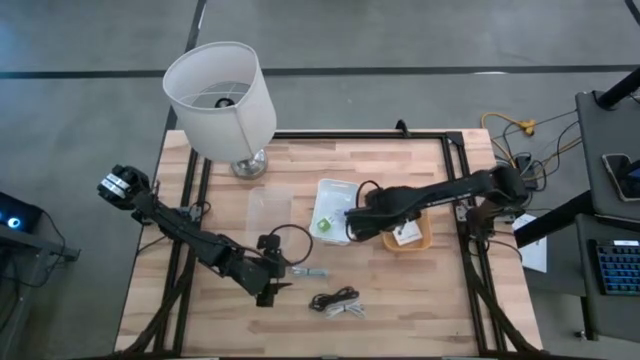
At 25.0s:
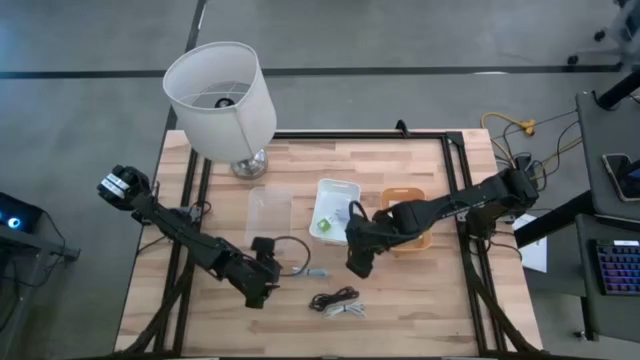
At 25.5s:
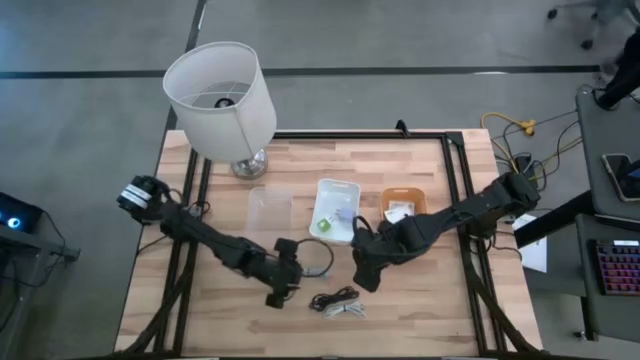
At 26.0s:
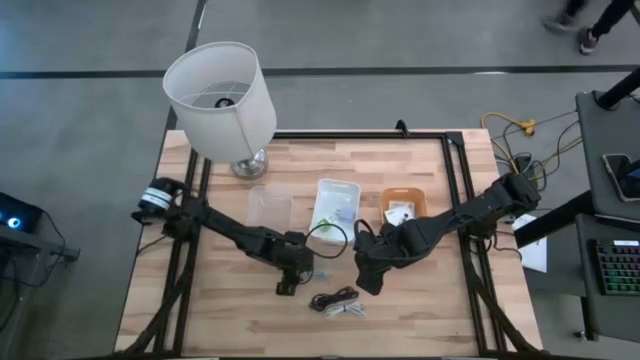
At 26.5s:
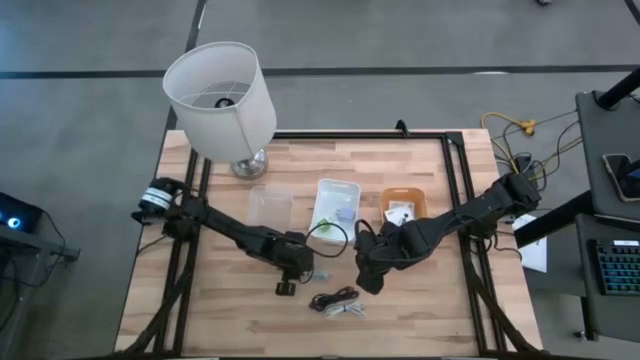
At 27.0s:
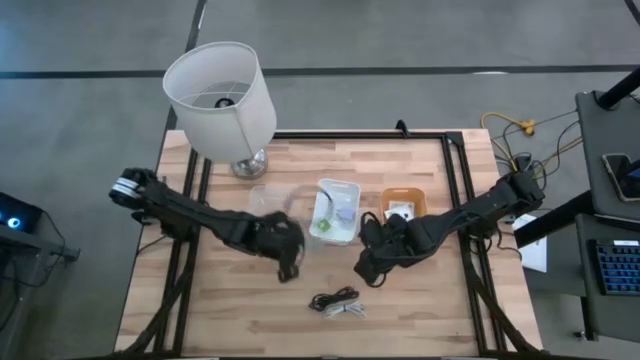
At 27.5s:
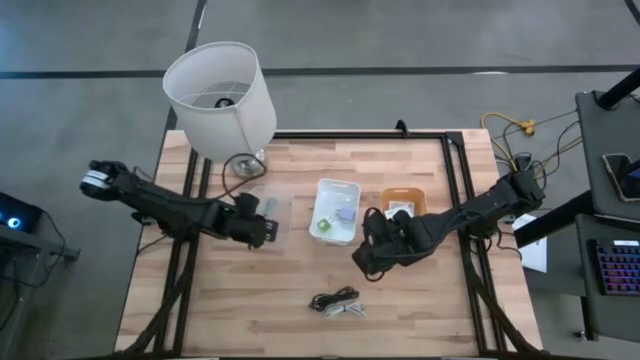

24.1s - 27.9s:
Task: Pick and place items into bin
Put the light blue USB cable into the transparent bin

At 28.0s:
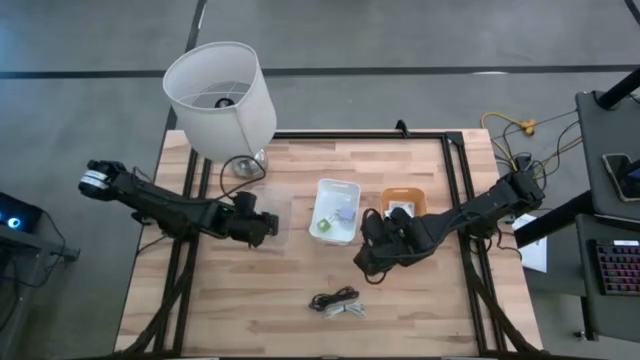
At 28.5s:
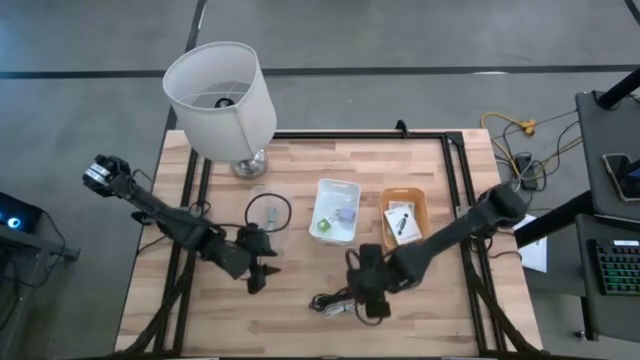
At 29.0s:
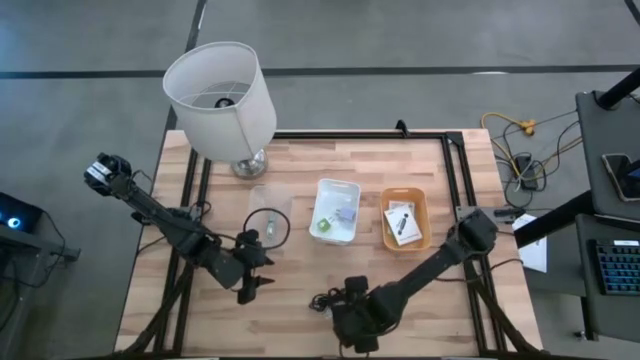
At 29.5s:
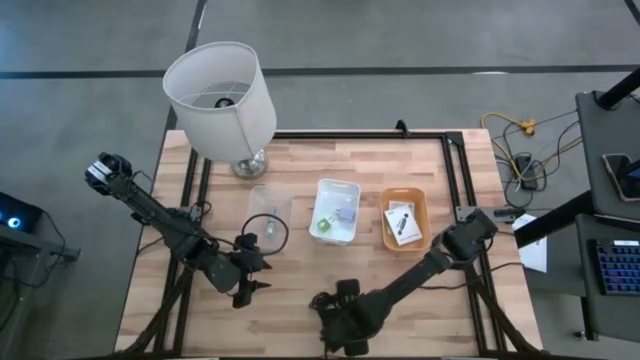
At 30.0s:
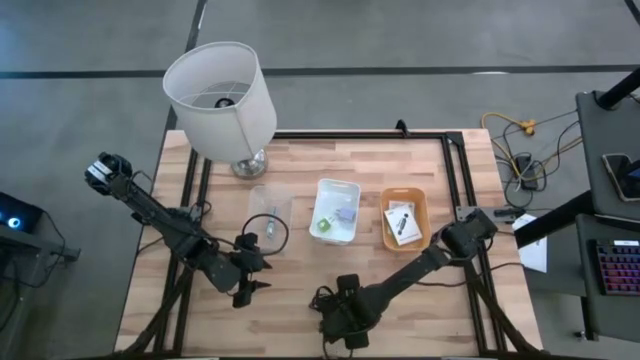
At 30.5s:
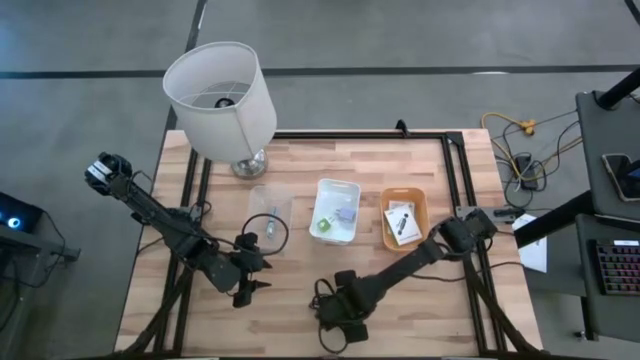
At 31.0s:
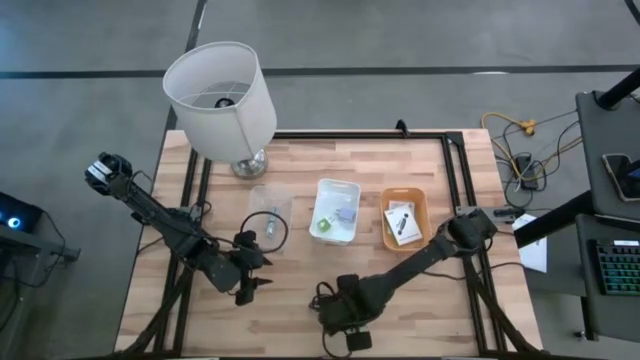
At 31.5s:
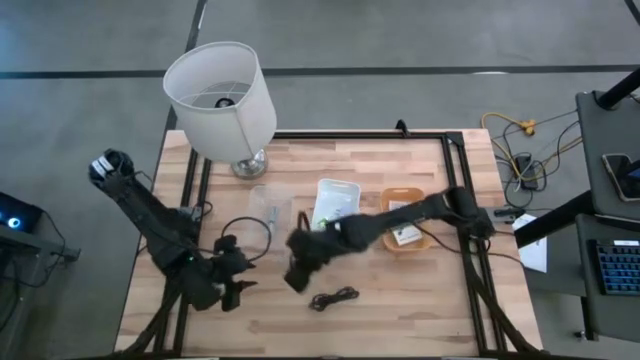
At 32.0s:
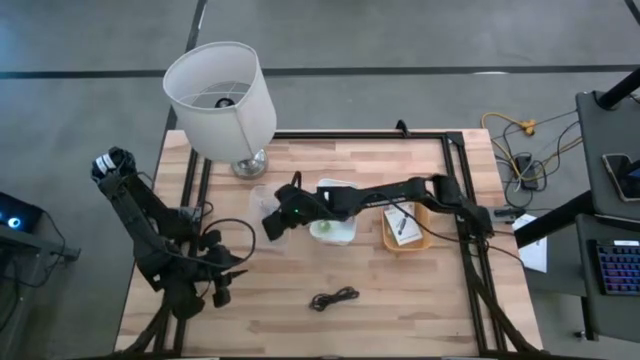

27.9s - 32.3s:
Put the white USB cable into the transparent bin

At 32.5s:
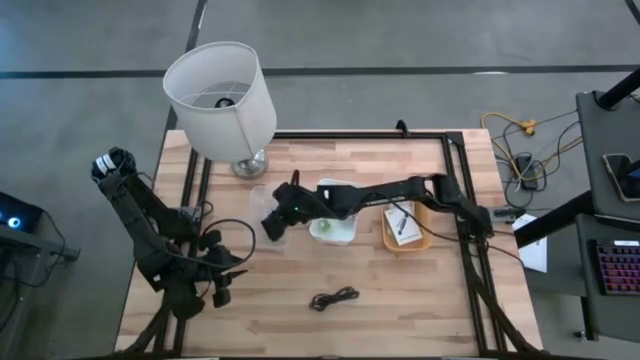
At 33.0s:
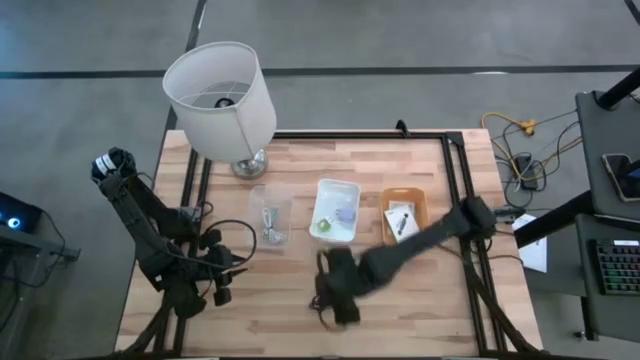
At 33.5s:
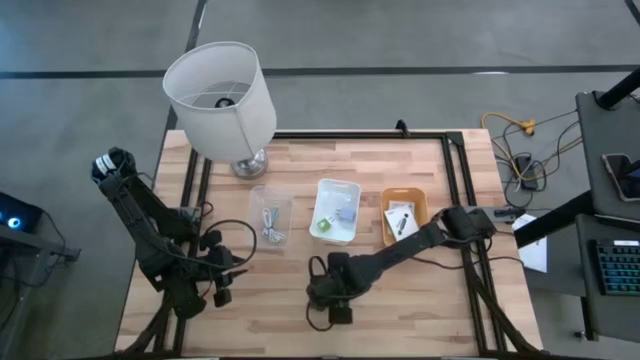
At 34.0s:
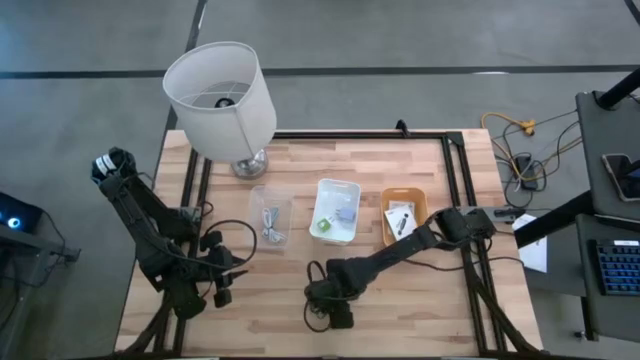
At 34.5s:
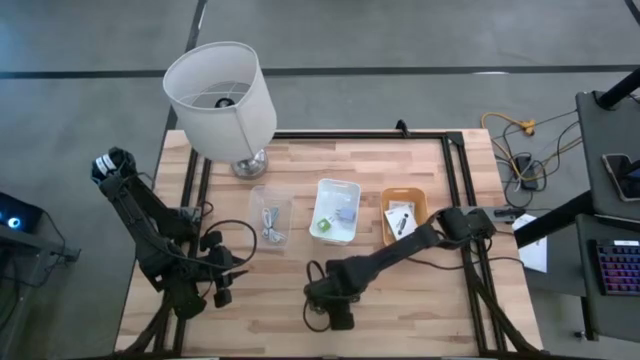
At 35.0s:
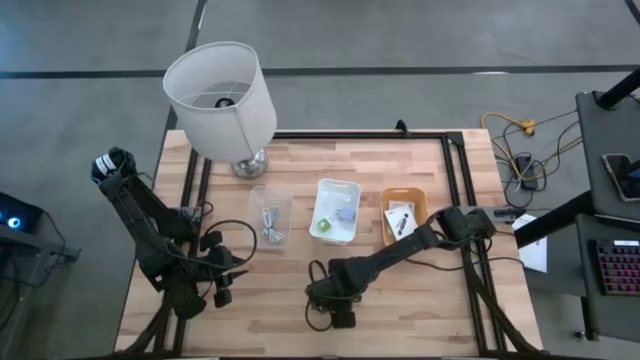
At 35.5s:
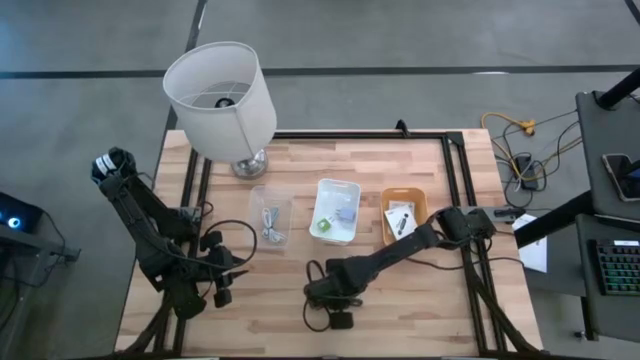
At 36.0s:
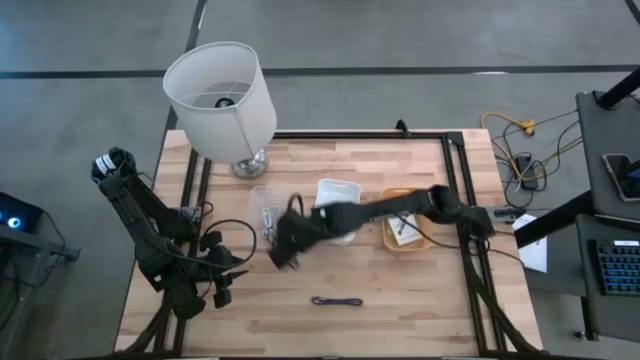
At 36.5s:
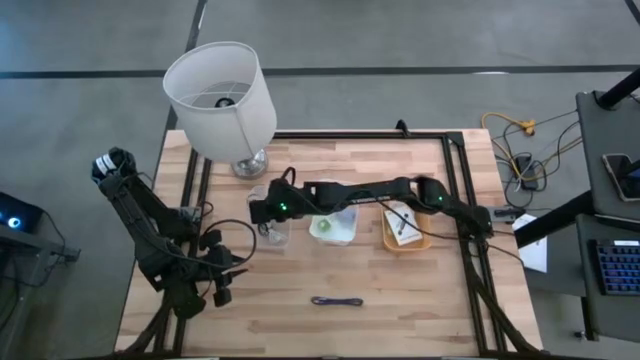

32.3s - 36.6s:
Put the black USB cable into the transparent bin

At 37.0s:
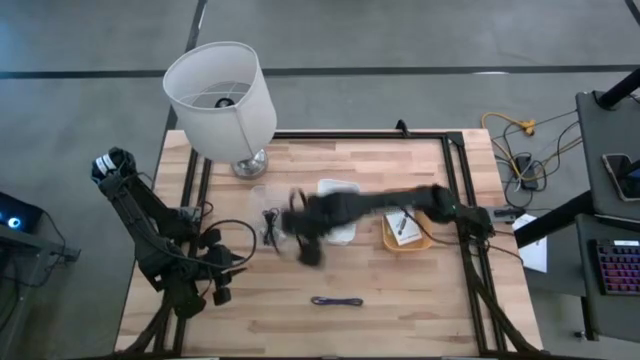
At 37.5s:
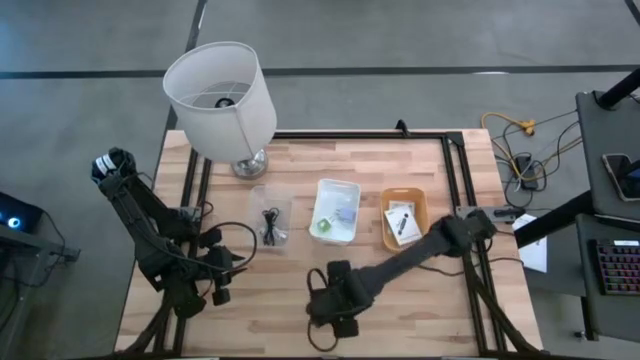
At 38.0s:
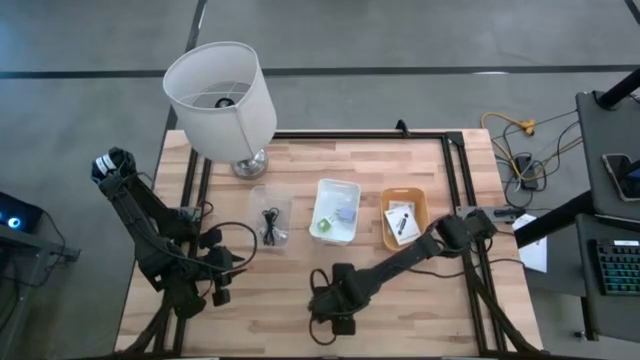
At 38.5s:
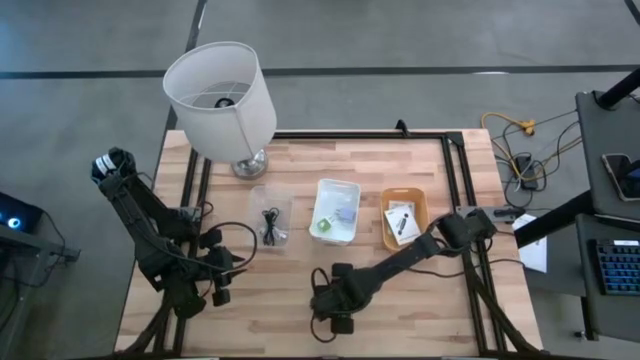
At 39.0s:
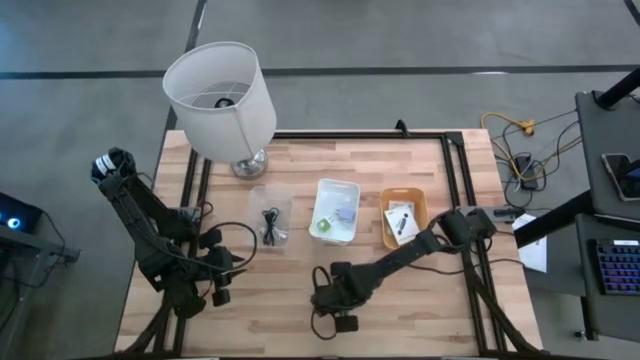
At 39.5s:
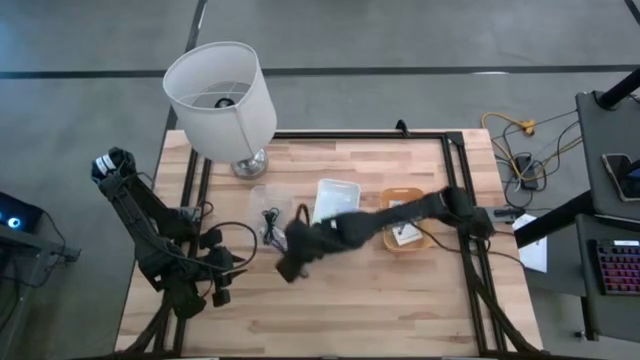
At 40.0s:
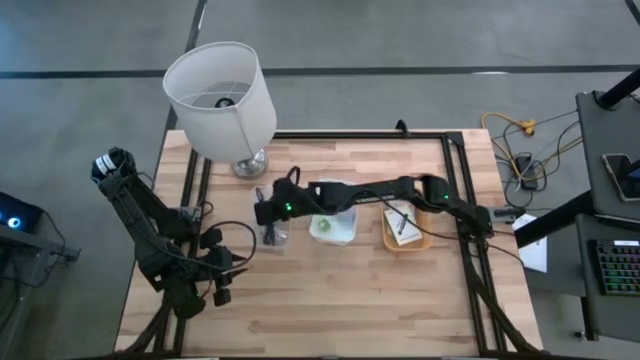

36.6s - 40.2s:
Put the blue USB cable into the transparent bin

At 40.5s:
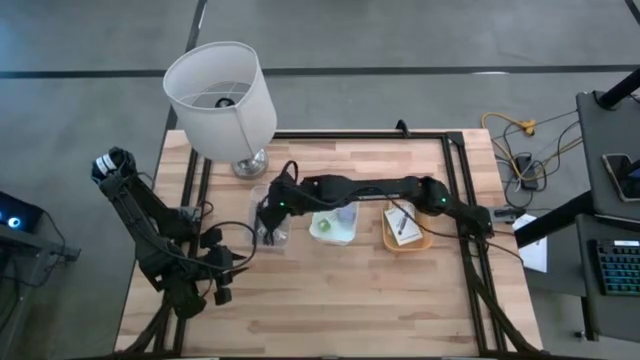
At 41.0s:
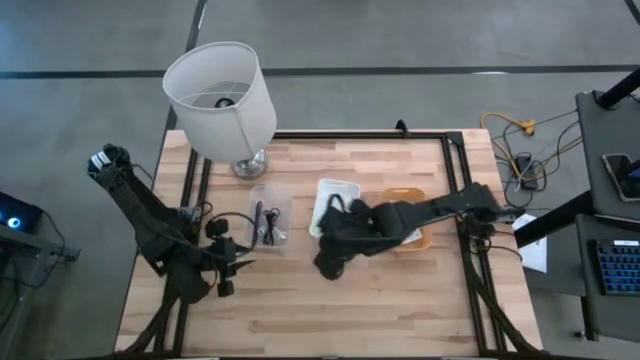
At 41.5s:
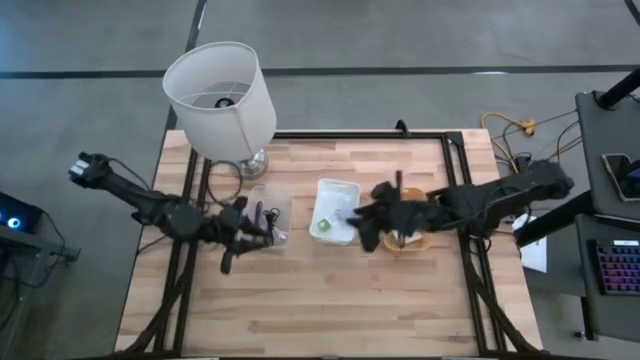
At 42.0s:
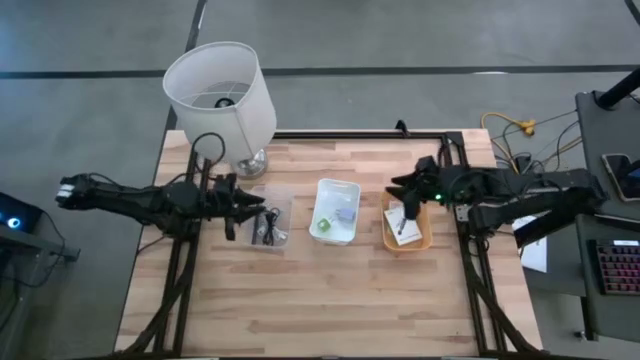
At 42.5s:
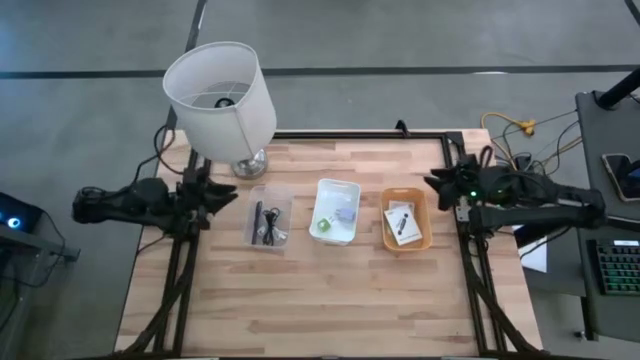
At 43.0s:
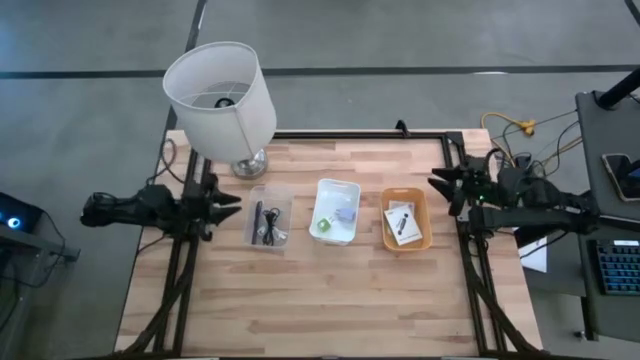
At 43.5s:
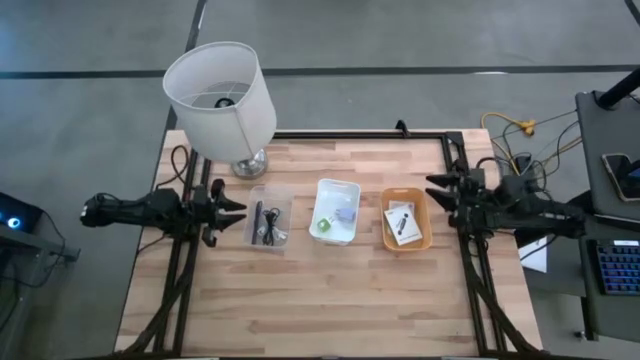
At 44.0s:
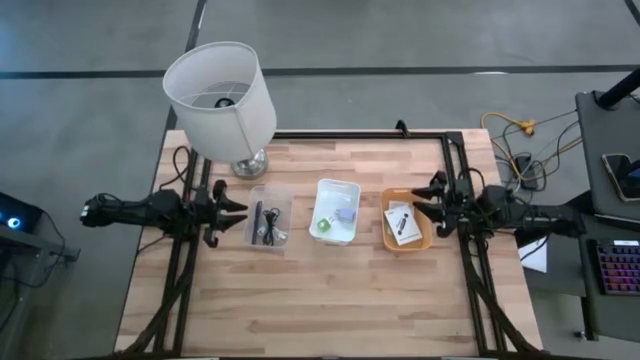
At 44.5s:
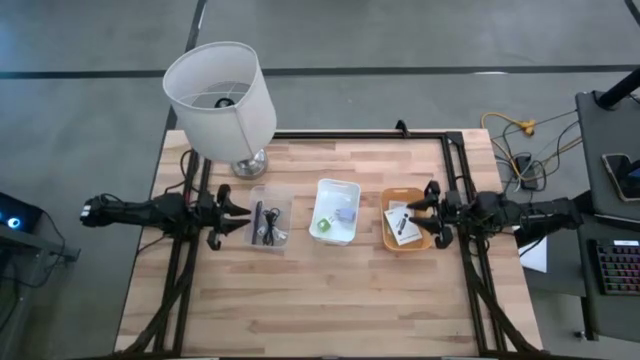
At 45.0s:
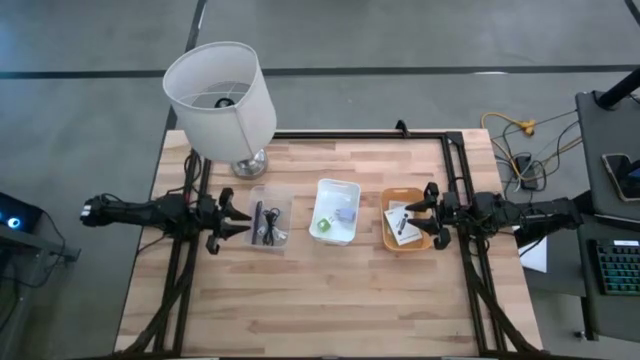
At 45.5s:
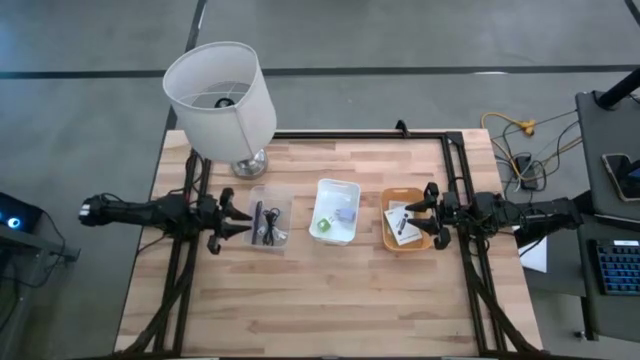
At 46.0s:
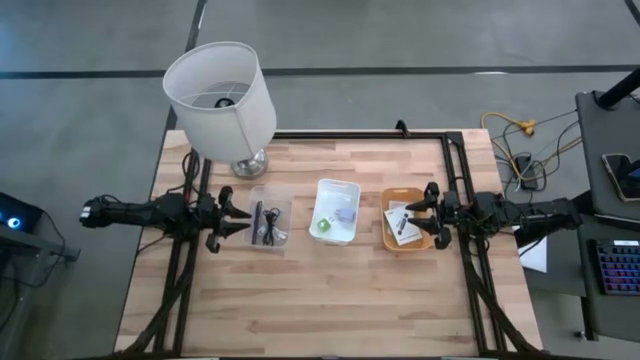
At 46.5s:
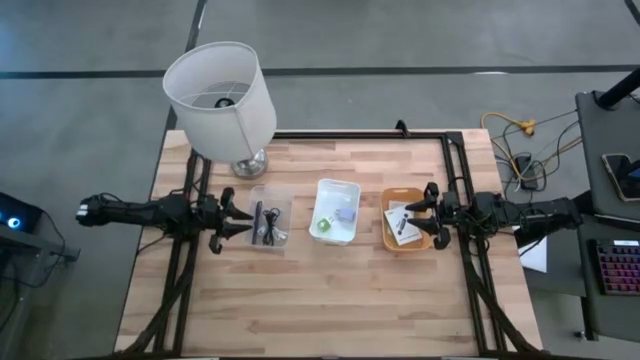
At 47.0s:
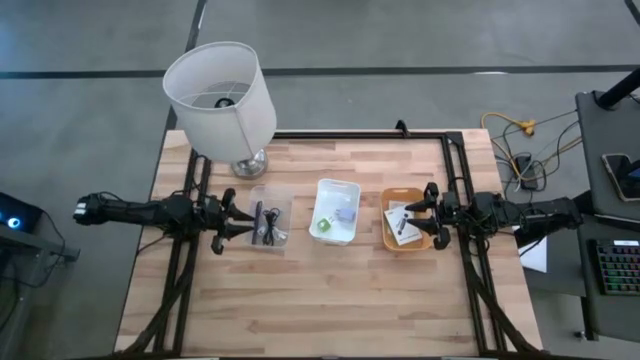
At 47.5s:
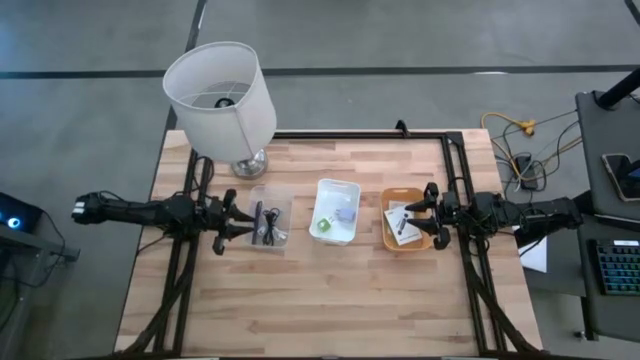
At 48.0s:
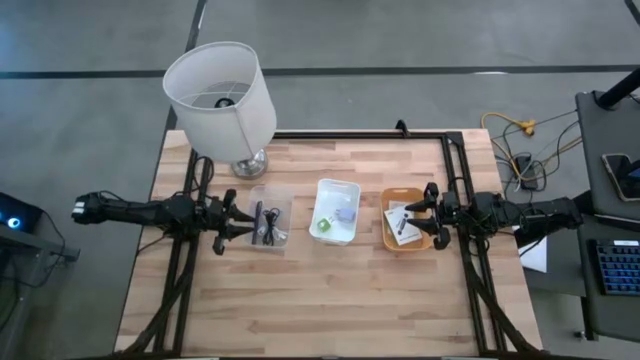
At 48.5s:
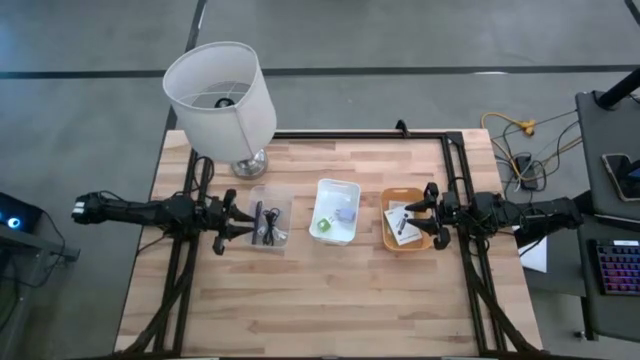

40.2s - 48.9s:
Return to Home Position
